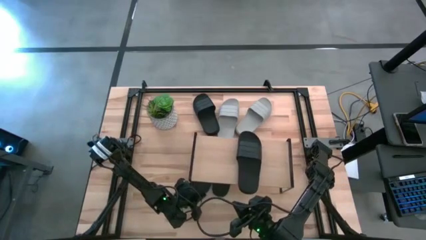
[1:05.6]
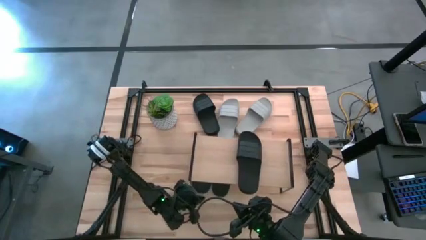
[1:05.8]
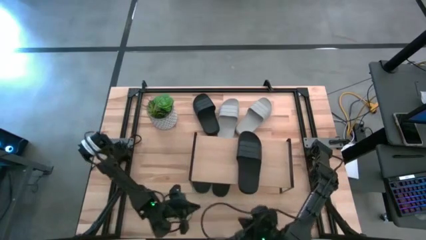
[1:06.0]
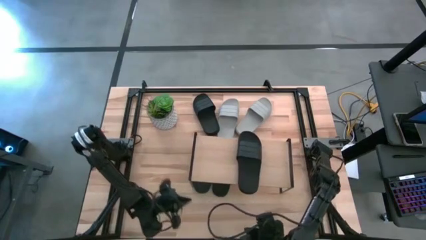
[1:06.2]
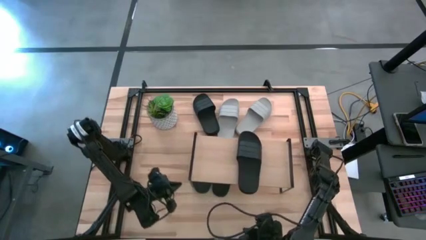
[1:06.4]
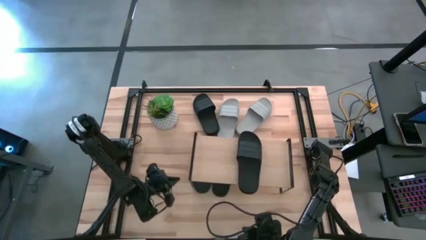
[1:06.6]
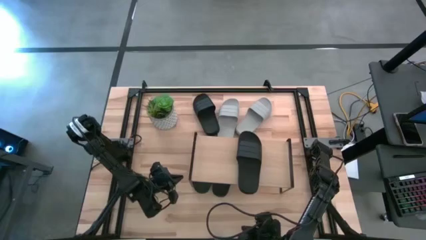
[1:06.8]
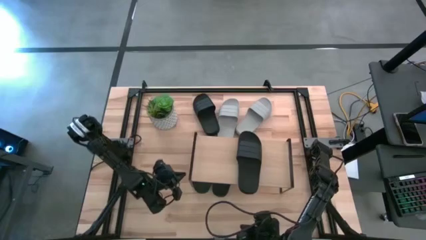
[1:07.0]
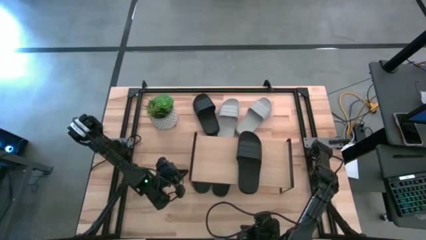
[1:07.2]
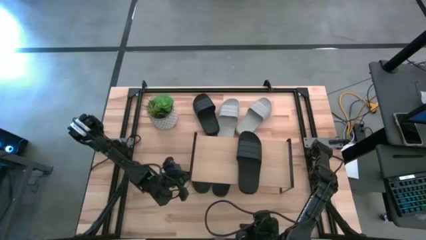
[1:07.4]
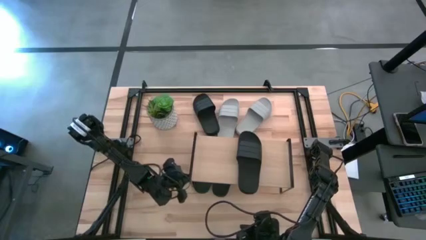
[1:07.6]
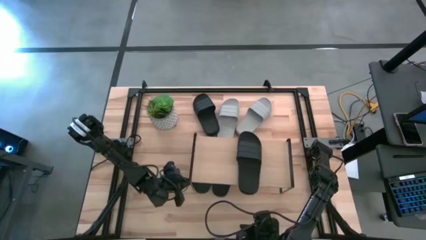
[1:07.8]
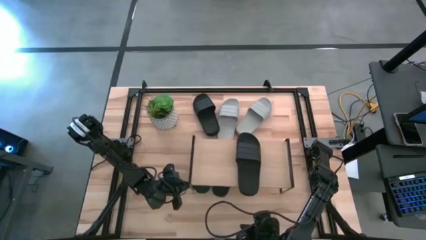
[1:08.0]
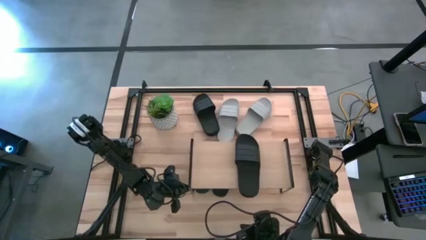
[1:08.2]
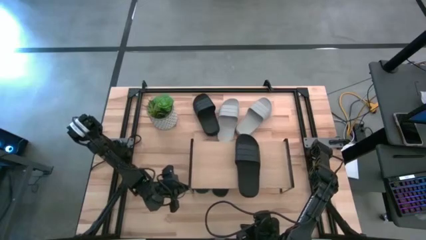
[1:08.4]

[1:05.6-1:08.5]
Task: Pick and place slides into the shelf
Adjust the shelf

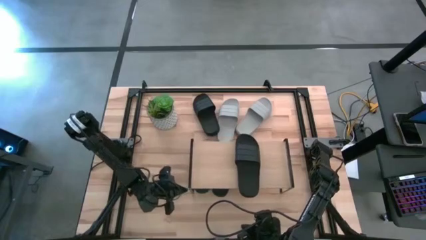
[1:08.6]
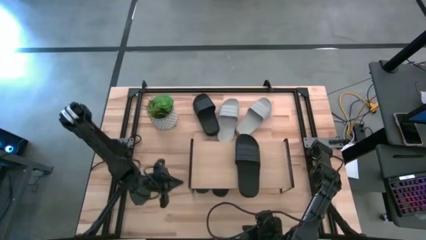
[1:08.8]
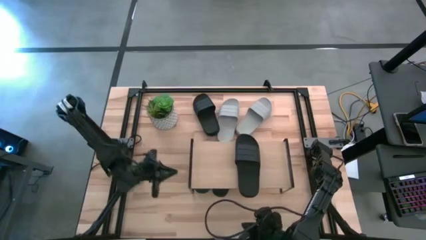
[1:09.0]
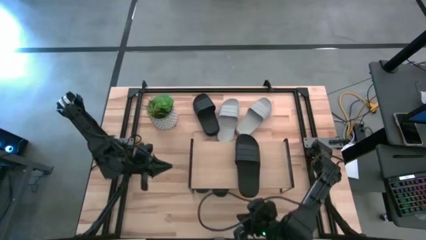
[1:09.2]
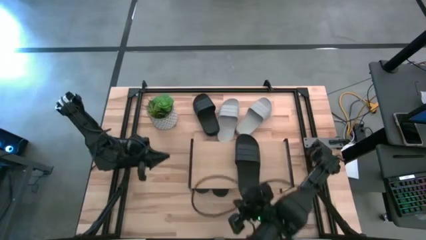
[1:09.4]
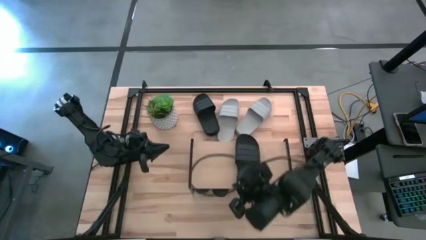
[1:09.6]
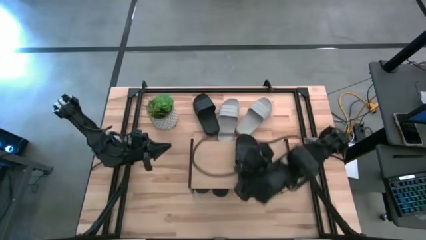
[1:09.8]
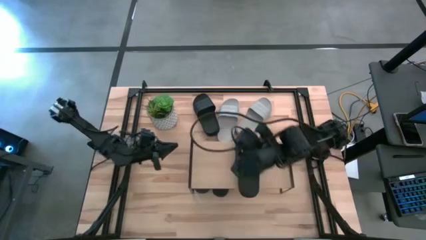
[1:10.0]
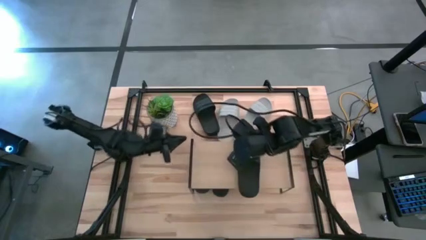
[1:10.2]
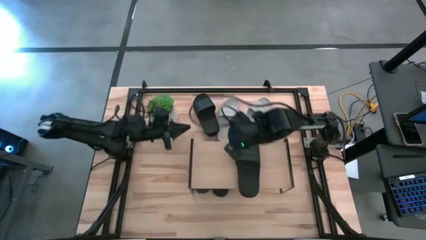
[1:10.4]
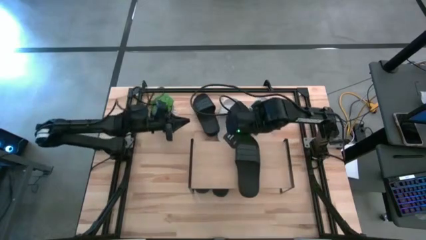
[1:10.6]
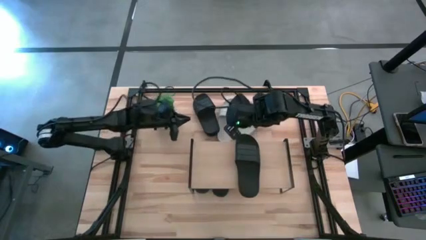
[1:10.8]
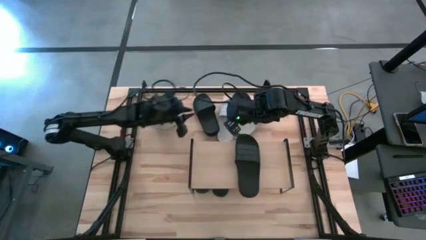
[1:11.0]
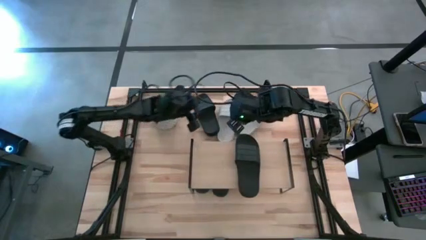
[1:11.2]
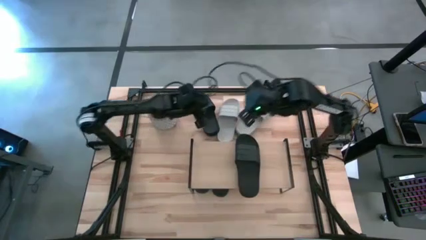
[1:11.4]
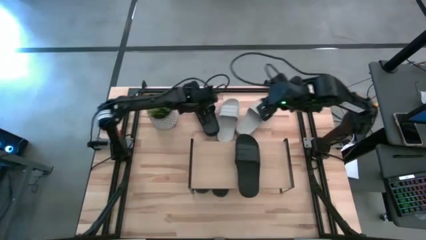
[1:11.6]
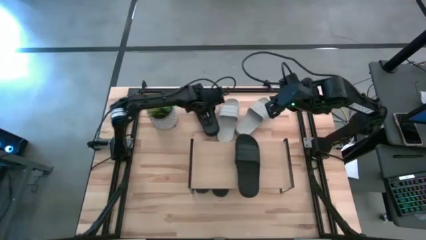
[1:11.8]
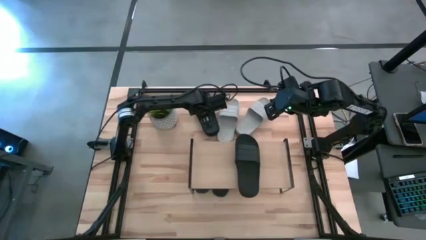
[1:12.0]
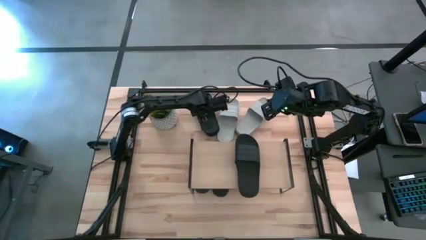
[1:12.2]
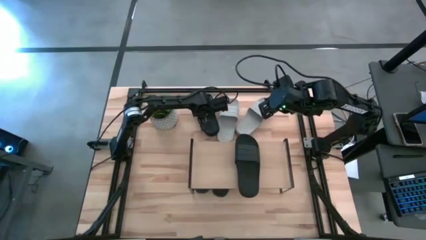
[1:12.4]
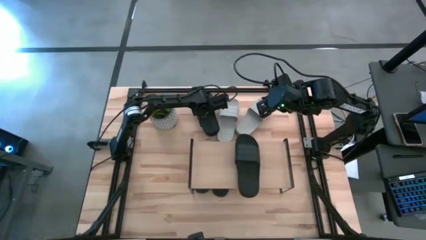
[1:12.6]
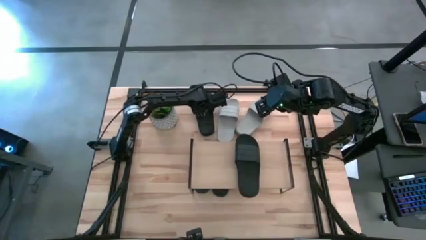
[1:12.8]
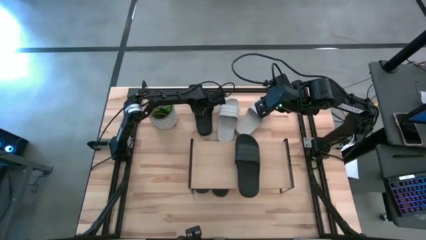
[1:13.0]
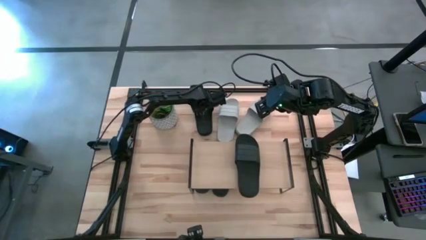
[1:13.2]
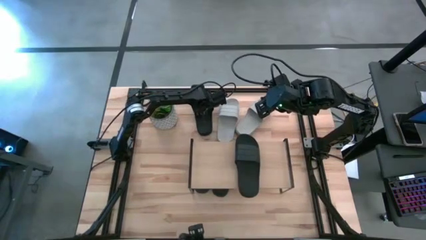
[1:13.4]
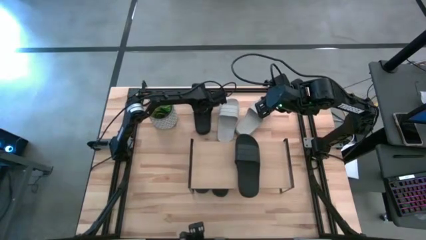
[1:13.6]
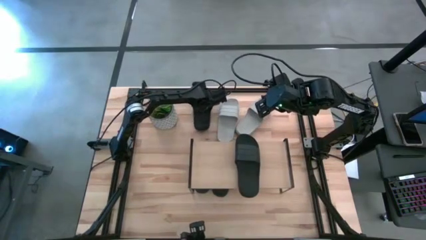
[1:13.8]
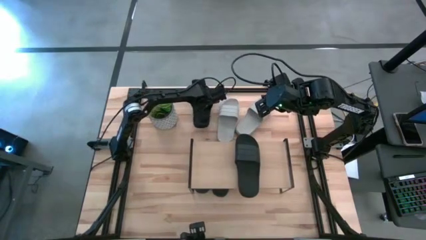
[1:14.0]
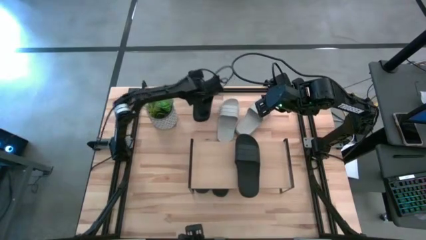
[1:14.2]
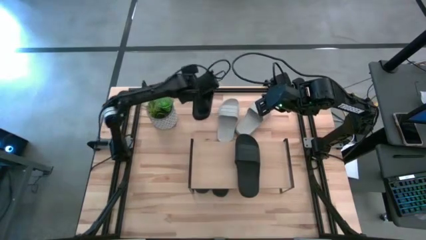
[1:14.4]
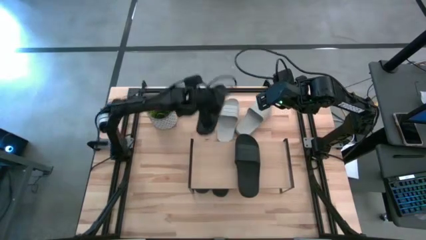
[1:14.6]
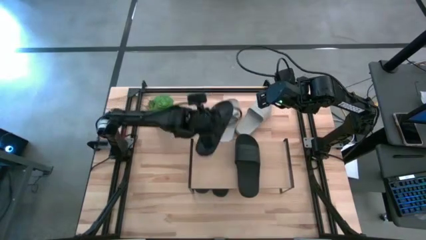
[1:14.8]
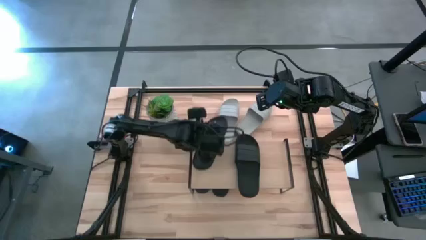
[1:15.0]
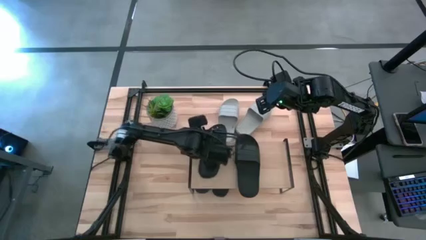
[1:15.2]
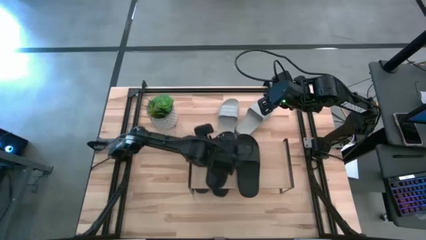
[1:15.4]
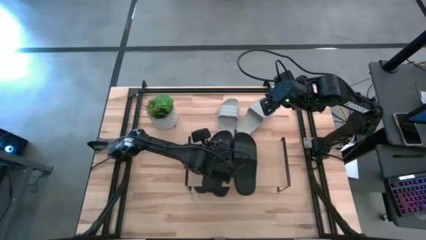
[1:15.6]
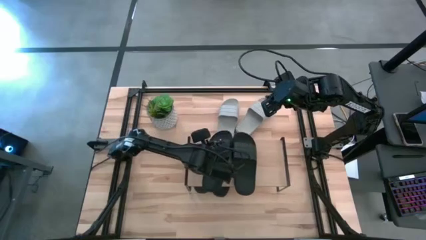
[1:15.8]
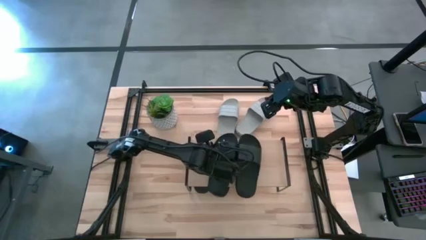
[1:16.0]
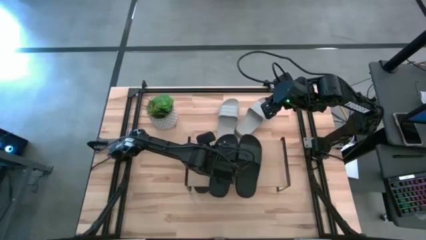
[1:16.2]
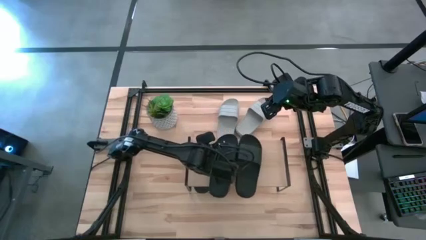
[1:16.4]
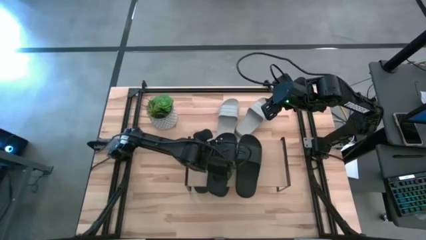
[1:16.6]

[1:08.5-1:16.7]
Put the black slide on the shelf

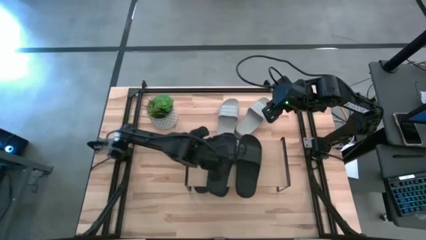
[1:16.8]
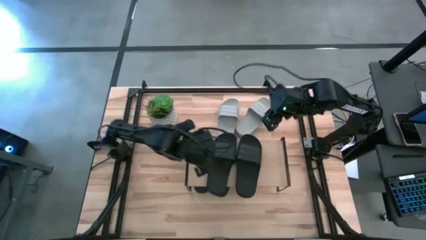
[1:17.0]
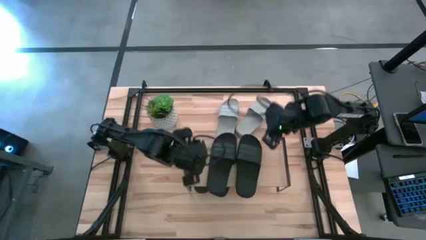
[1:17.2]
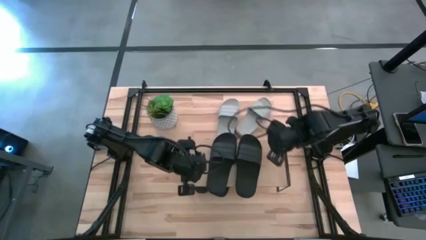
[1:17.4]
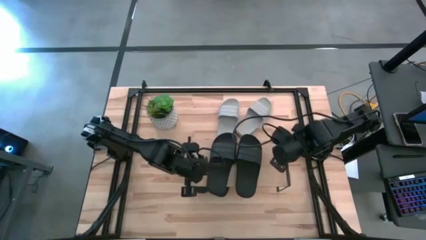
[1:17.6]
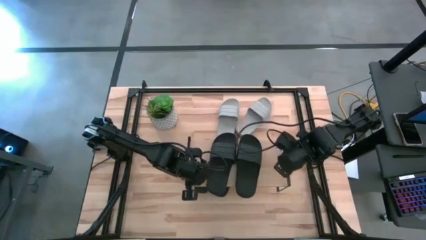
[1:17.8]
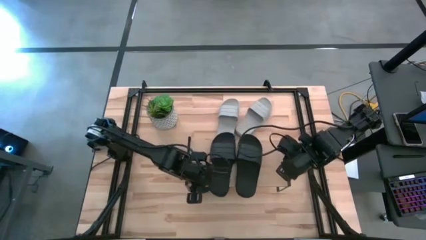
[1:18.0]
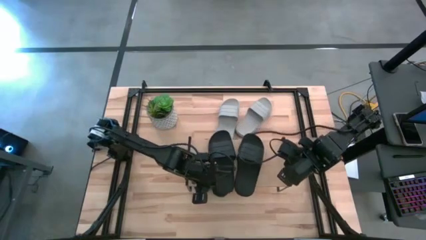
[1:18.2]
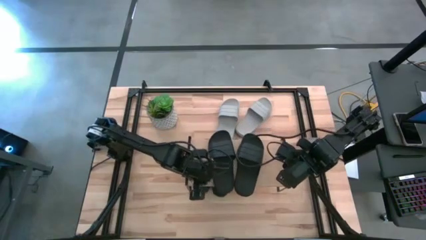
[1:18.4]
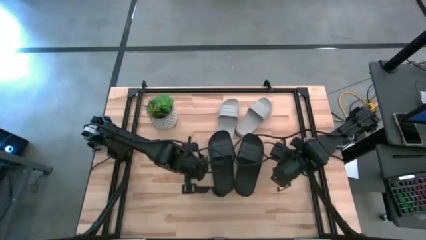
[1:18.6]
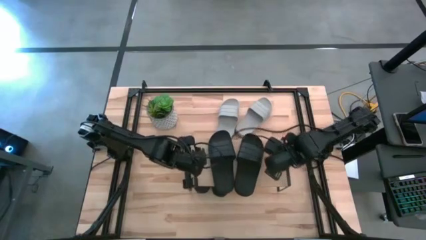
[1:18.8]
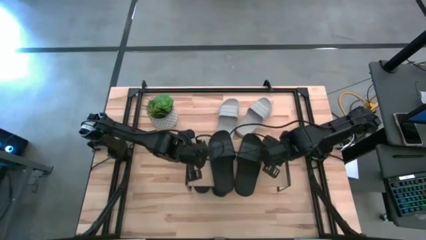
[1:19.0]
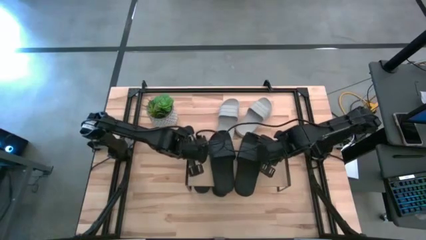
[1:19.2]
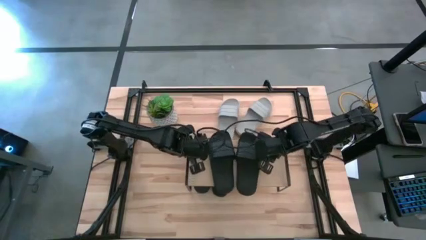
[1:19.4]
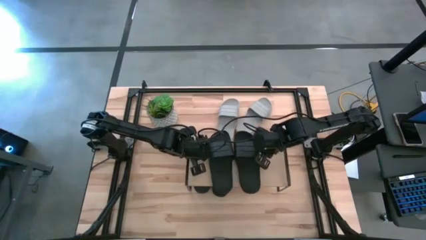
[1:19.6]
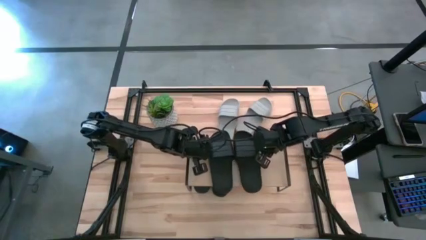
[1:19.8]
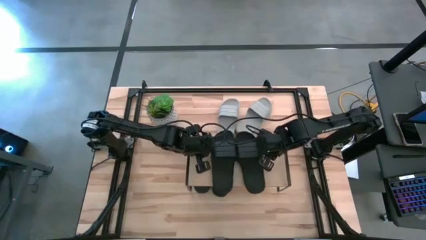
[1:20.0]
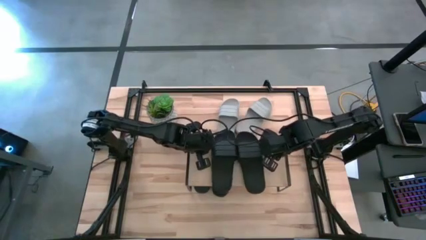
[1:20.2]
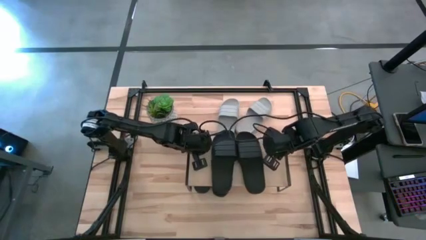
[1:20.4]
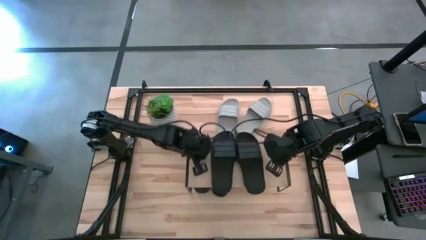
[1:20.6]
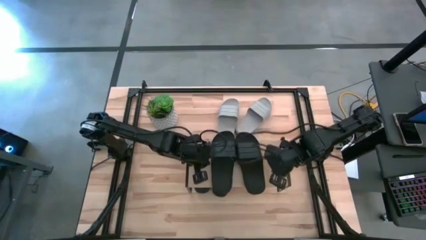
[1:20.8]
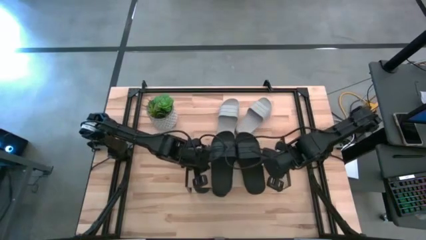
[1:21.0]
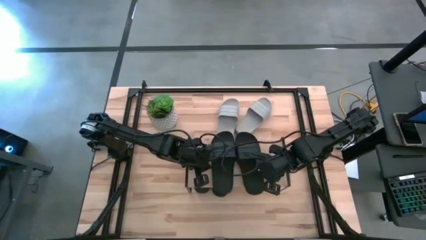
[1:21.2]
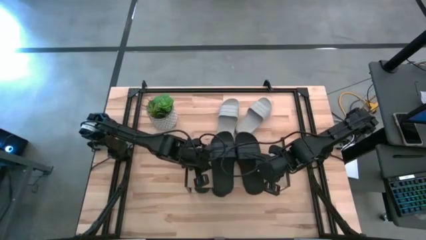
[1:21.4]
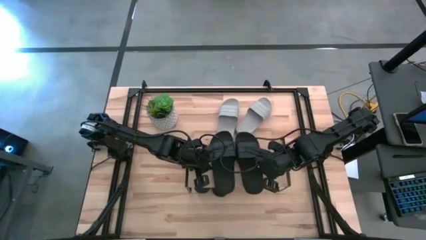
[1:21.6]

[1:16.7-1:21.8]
Adjust the black slides on the shelf

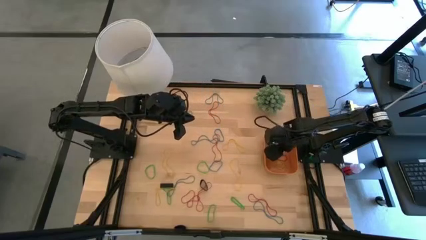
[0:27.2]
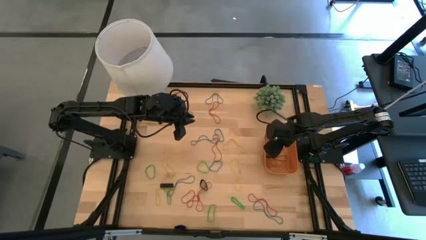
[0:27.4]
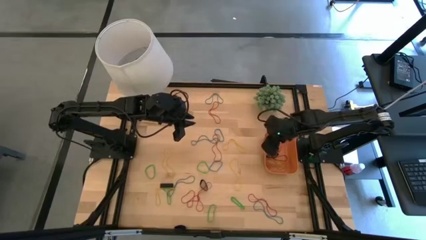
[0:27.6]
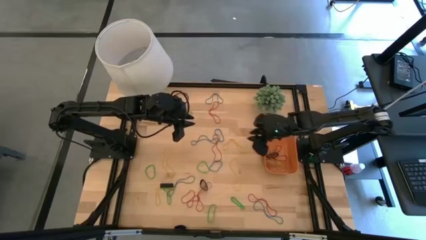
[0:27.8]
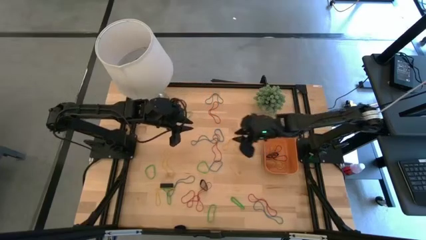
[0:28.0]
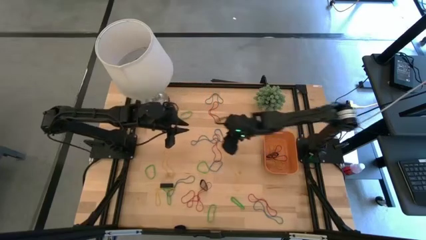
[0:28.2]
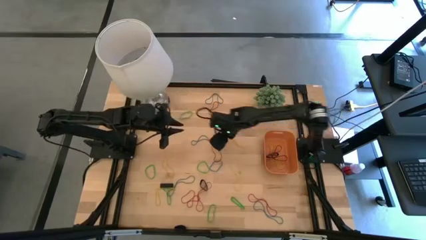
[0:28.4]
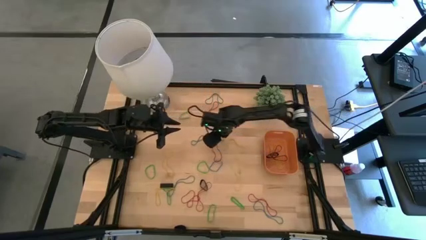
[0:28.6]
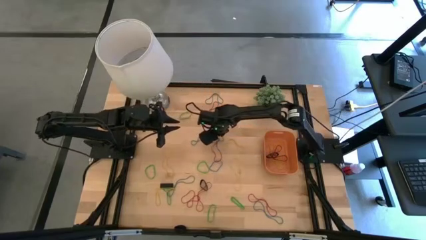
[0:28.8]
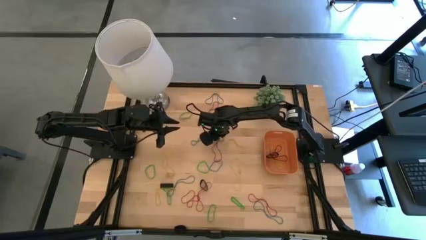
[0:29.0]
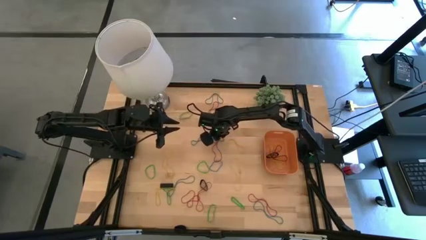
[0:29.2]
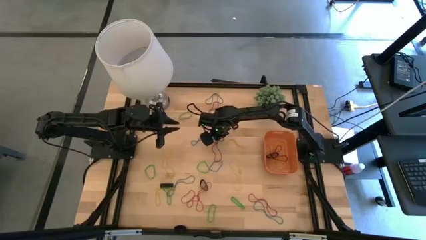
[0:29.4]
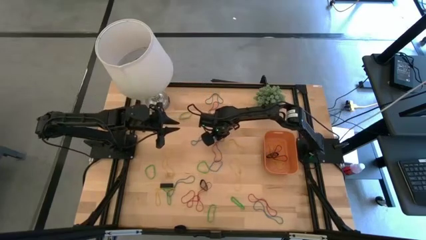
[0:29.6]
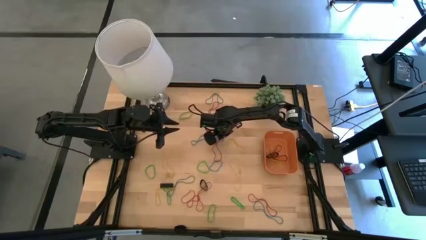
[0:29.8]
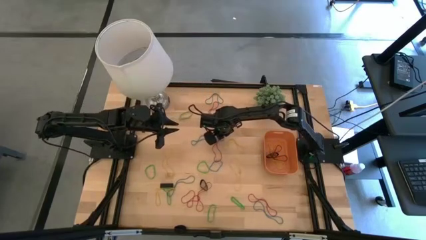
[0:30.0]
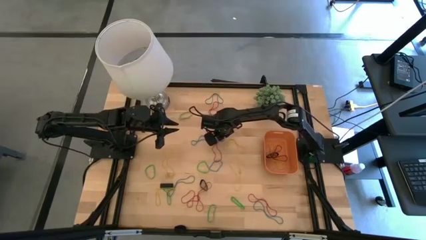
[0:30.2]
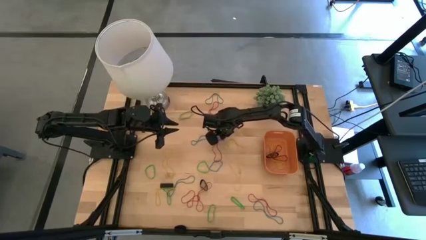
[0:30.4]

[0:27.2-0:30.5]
Task: Pick and place rubber bands into bin
Put the blue rubber band into the bin
